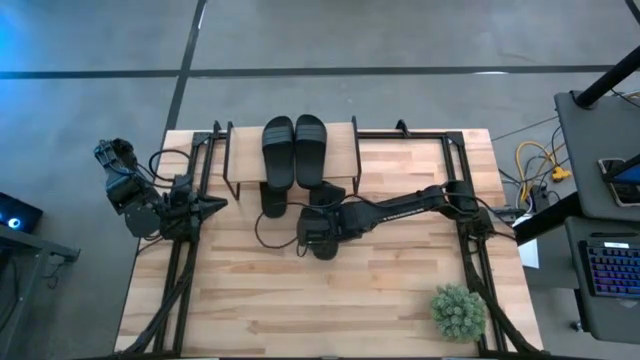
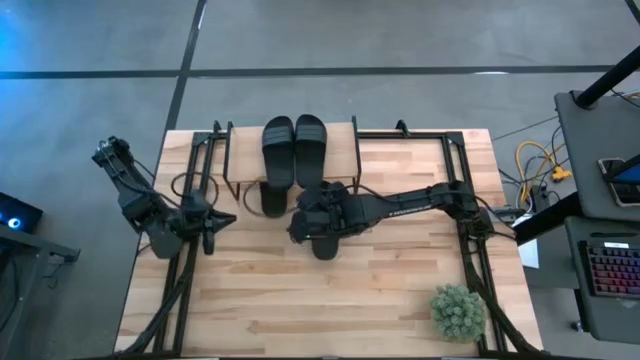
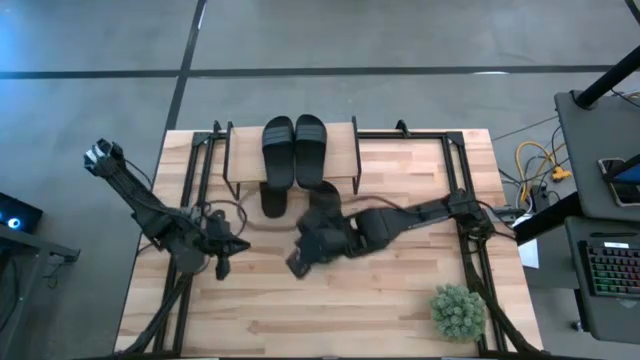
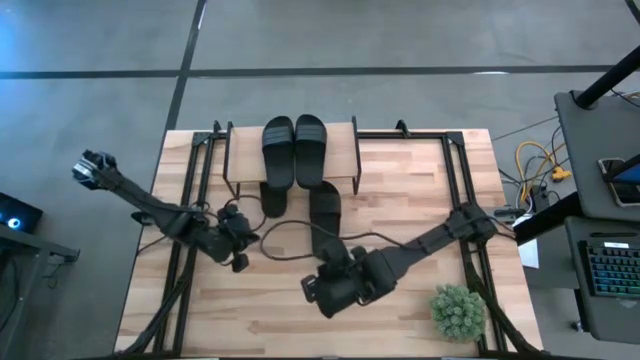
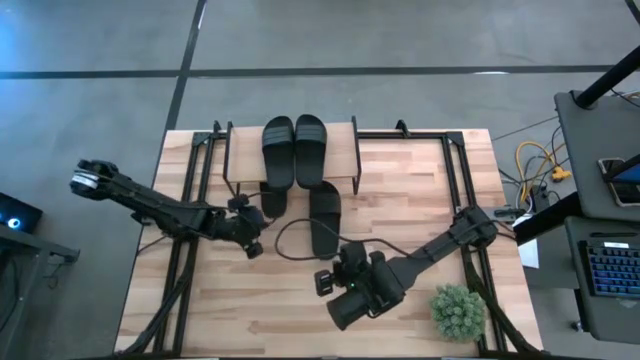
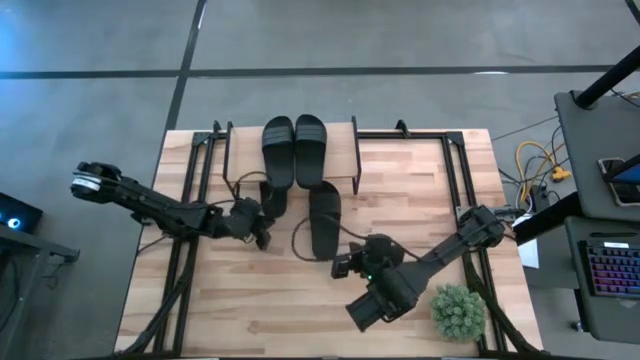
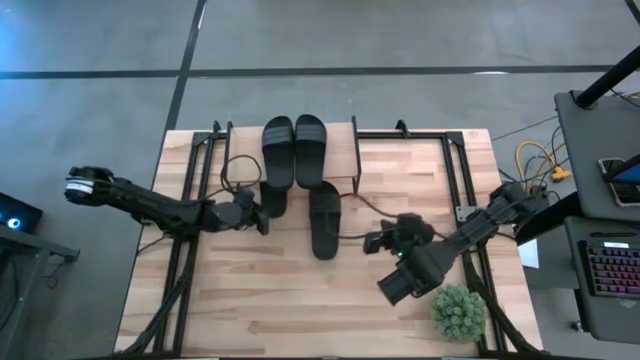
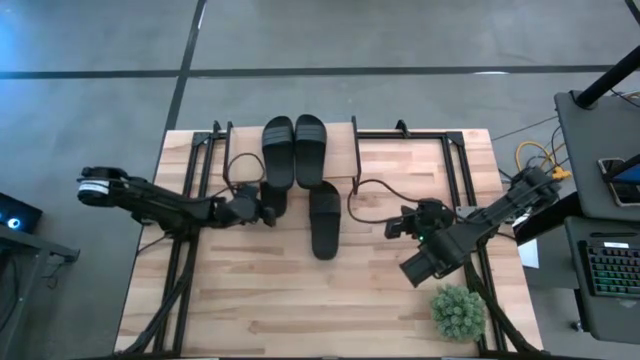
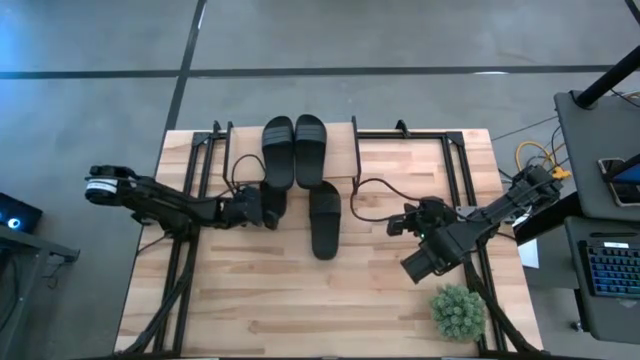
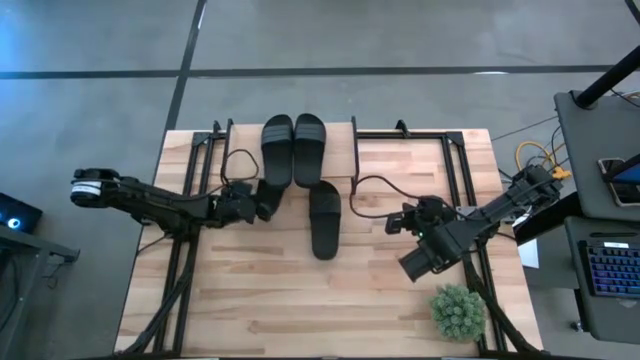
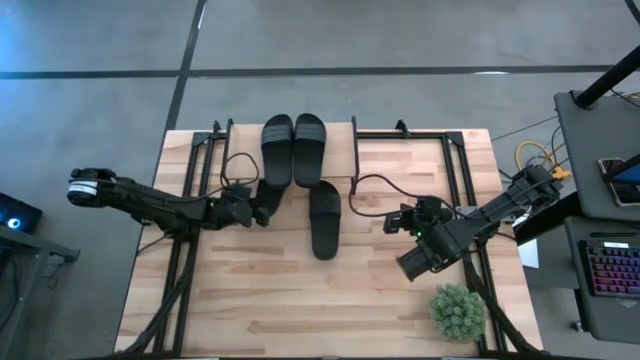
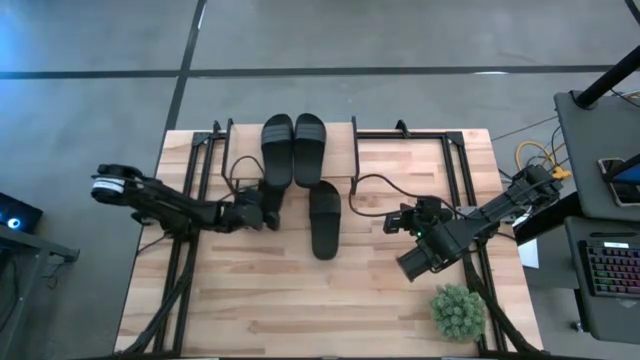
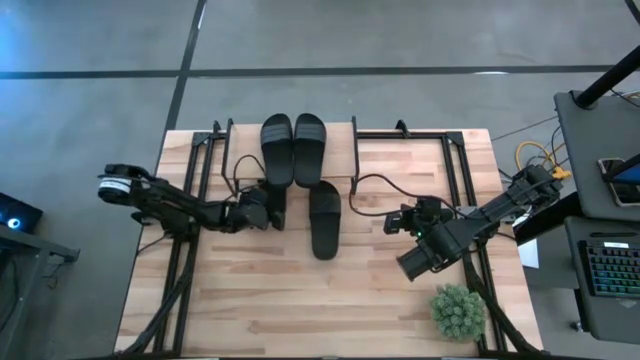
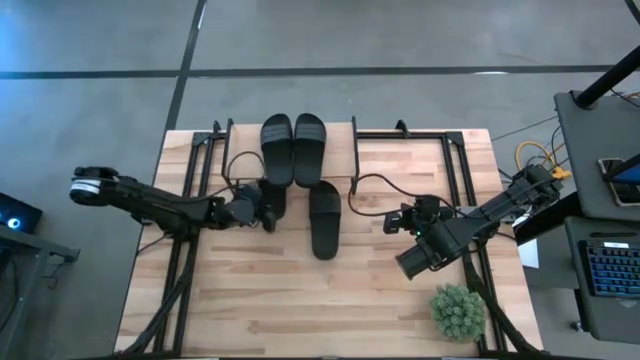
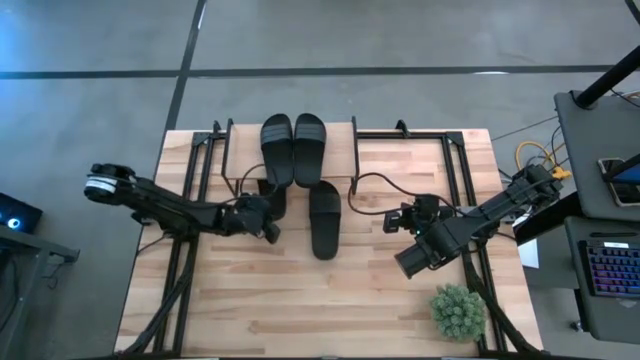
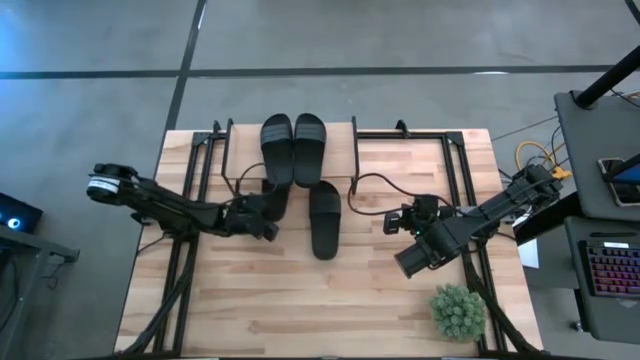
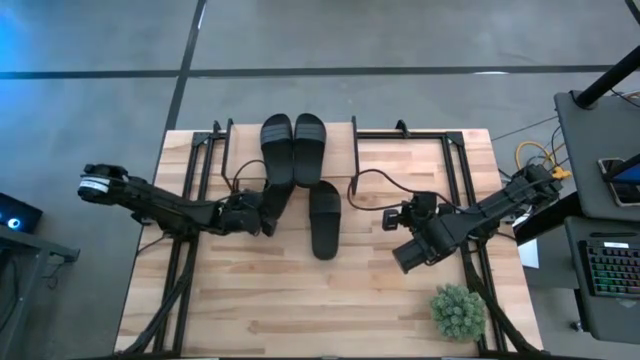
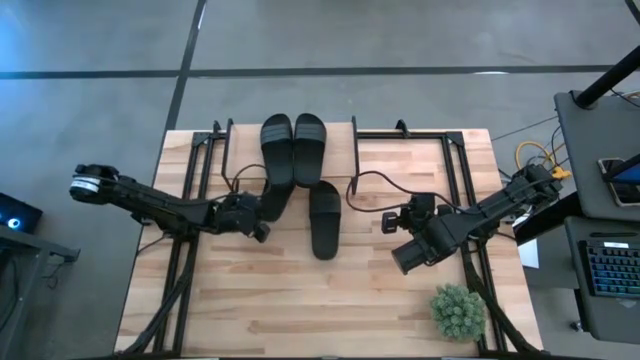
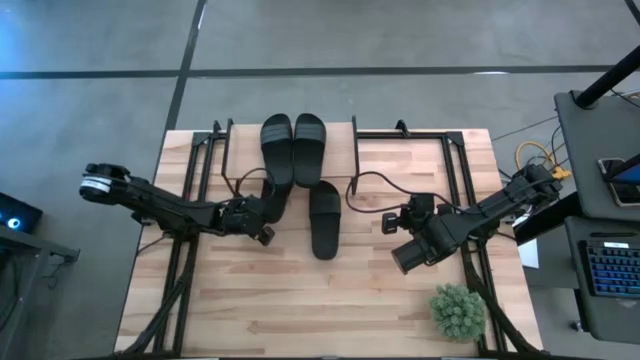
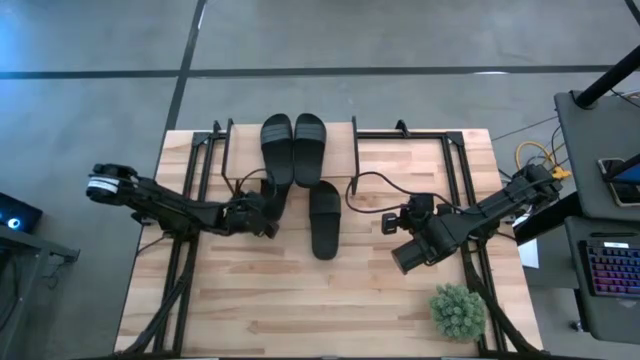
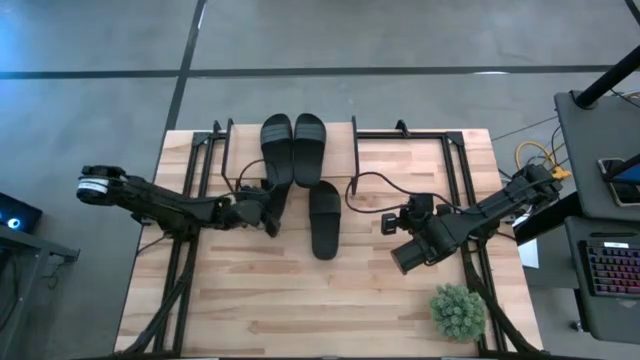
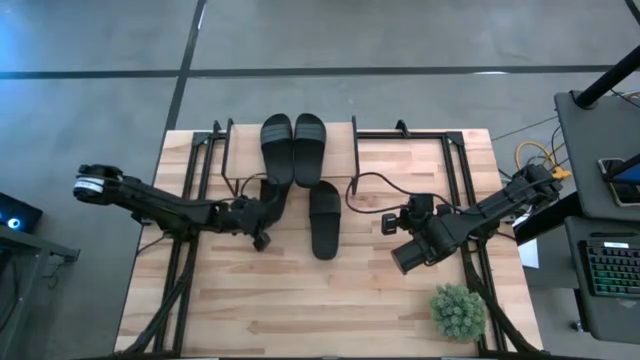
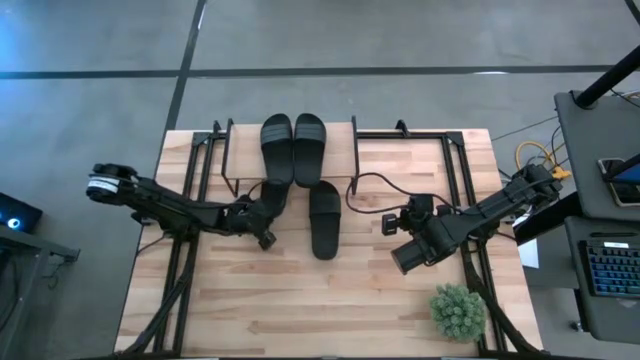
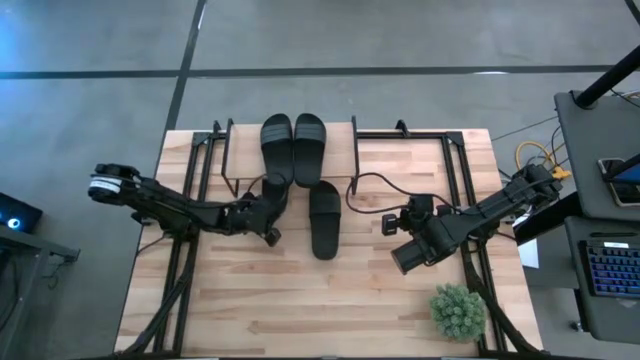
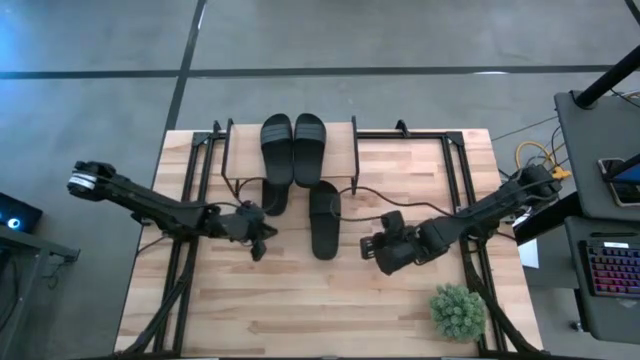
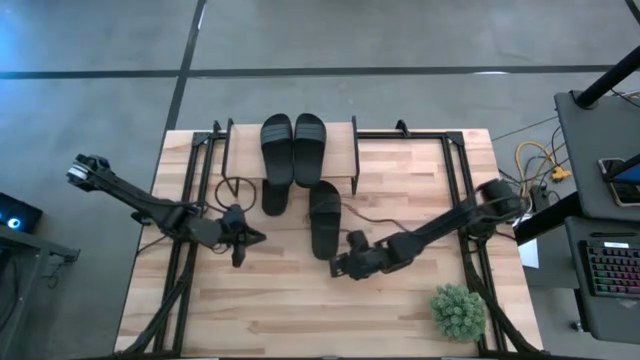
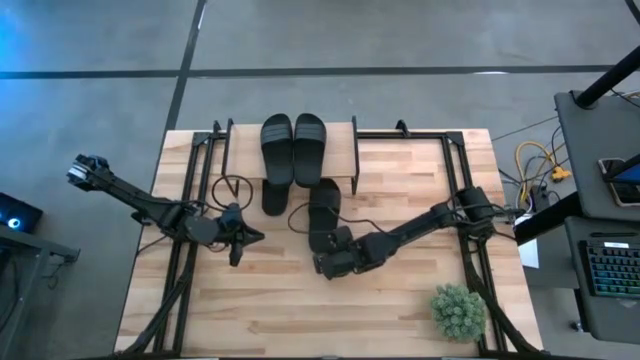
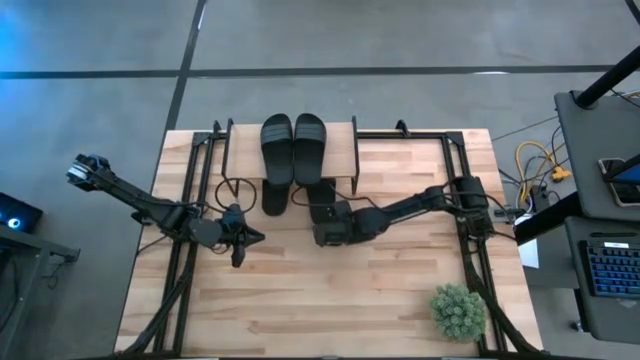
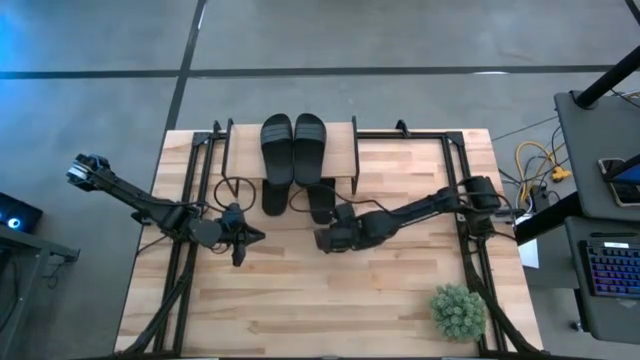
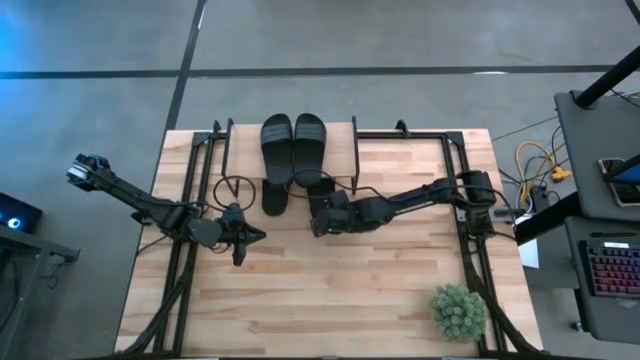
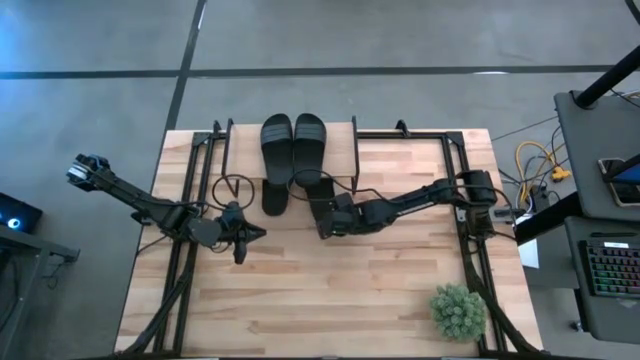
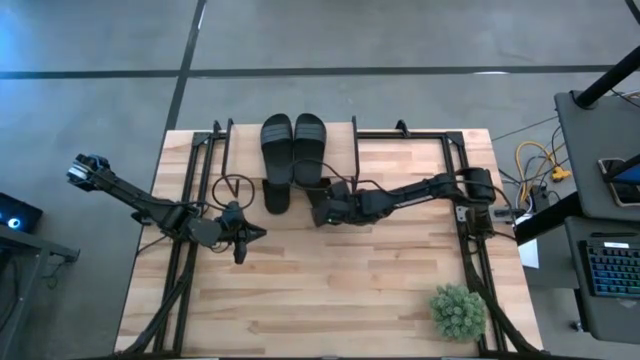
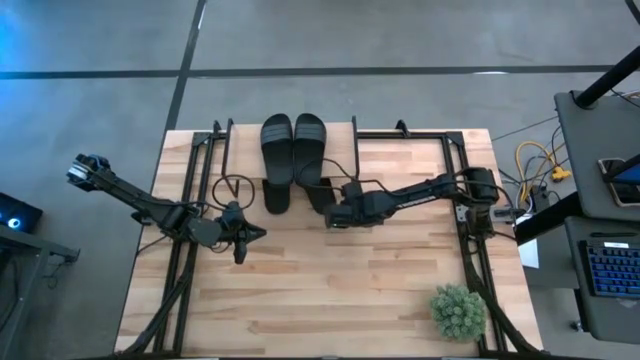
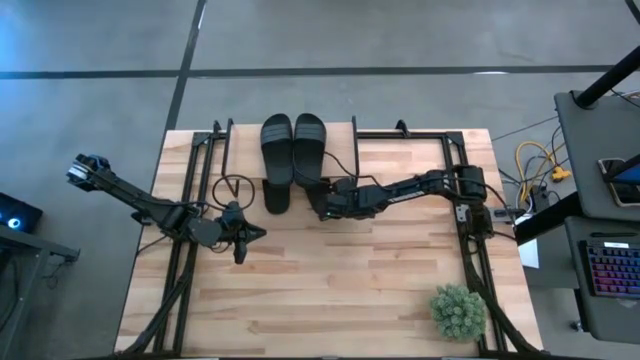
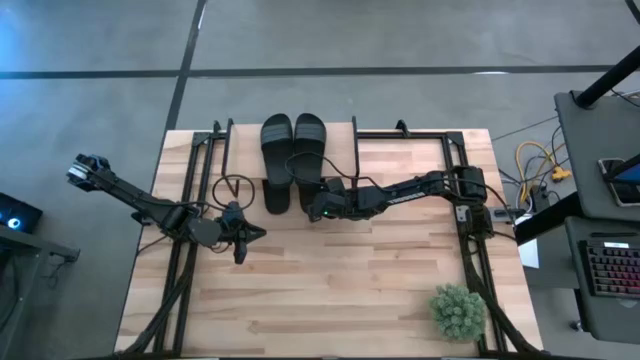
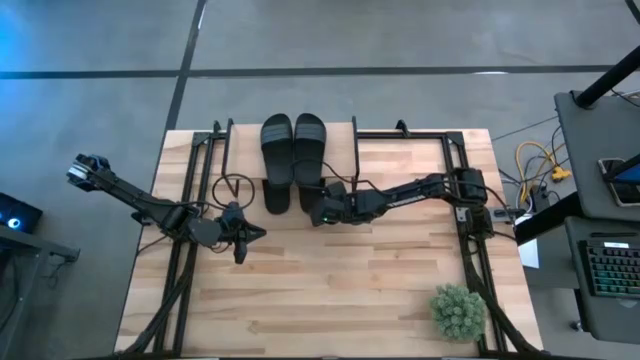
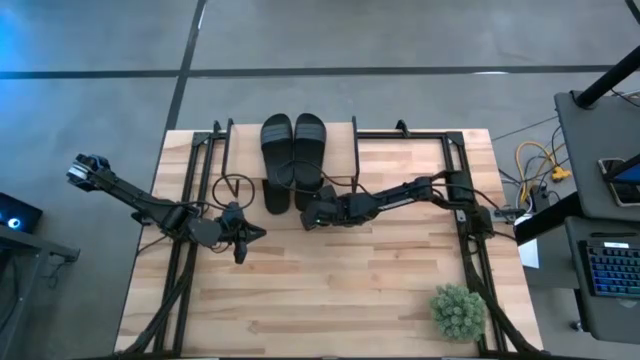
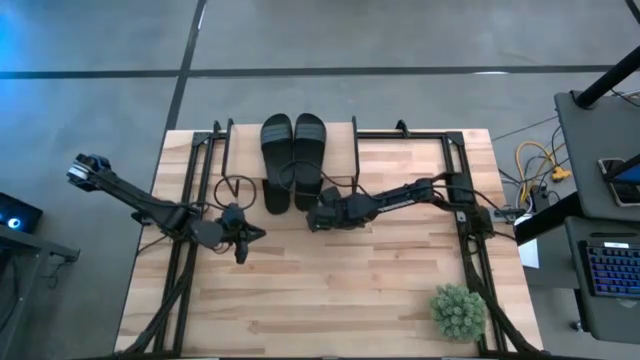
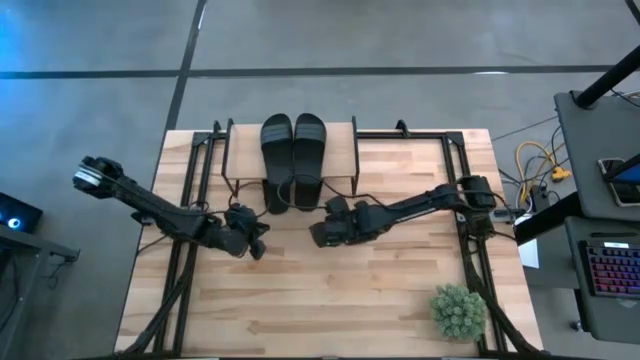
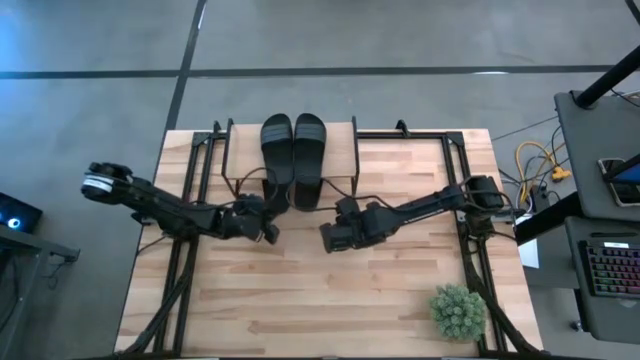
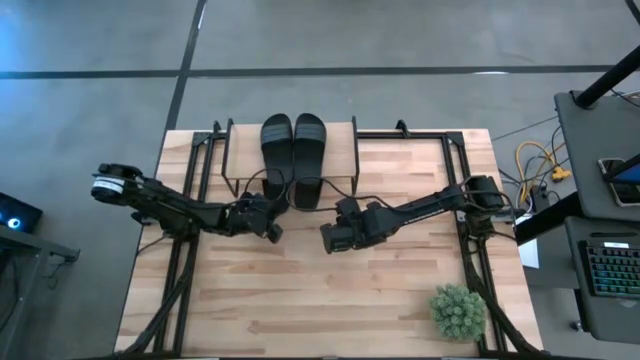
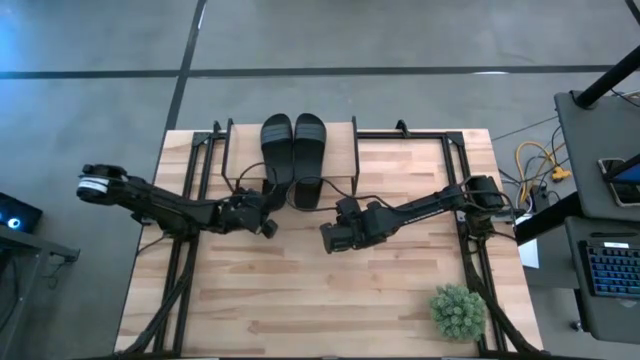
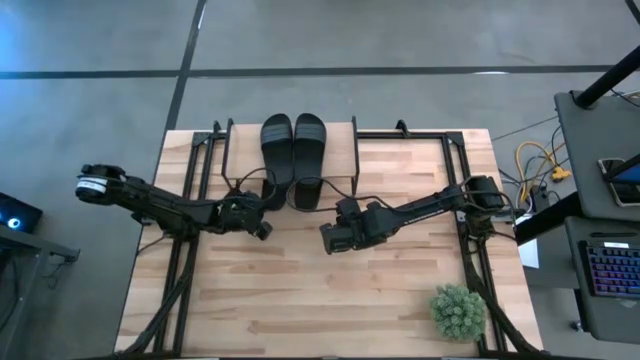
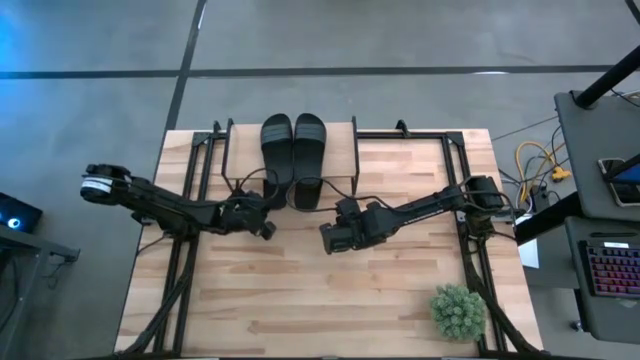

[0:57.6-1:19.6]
Task: Pick and place slides into the shelf
Adjust the big black slides under the shelf
